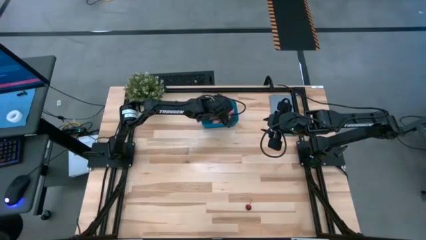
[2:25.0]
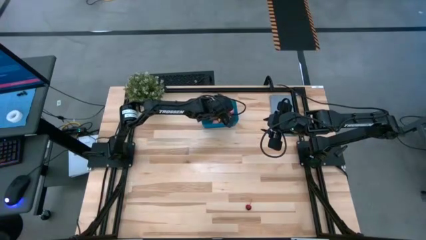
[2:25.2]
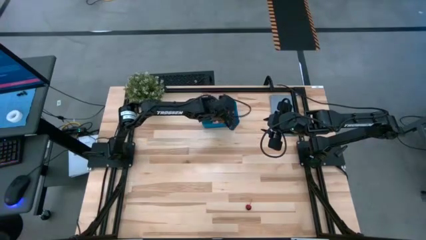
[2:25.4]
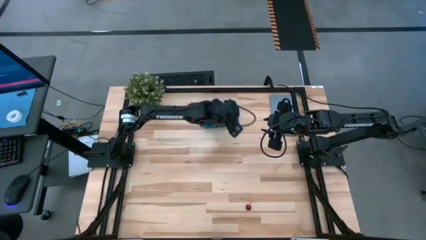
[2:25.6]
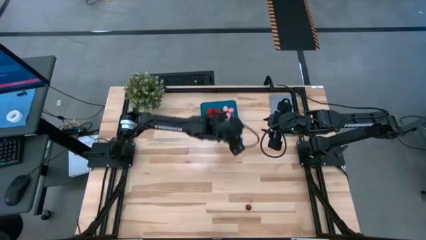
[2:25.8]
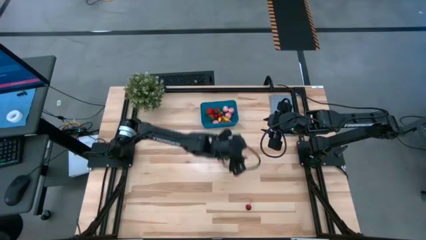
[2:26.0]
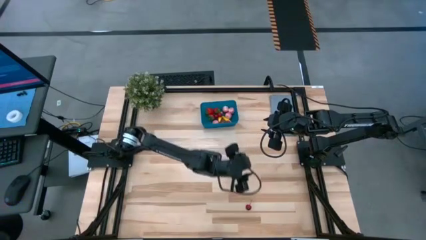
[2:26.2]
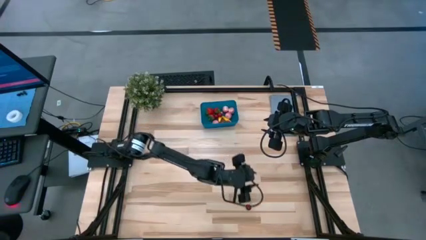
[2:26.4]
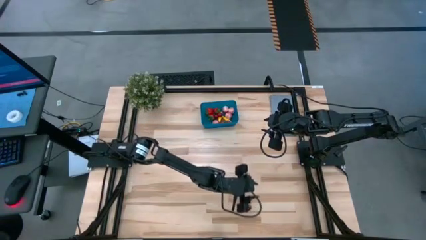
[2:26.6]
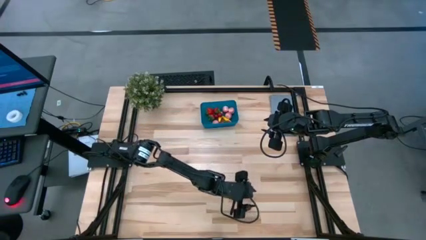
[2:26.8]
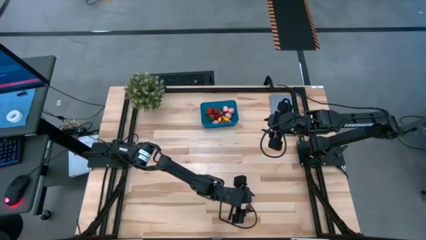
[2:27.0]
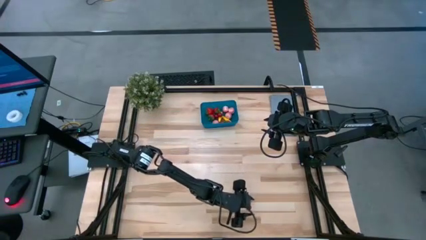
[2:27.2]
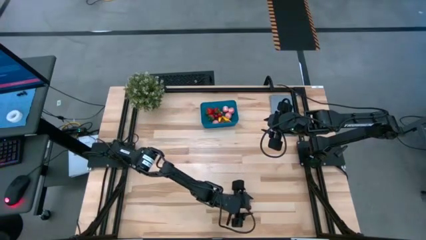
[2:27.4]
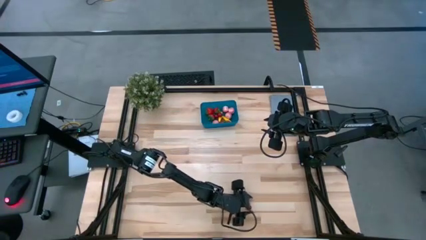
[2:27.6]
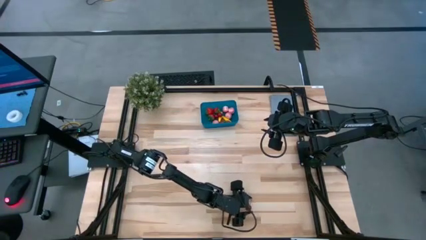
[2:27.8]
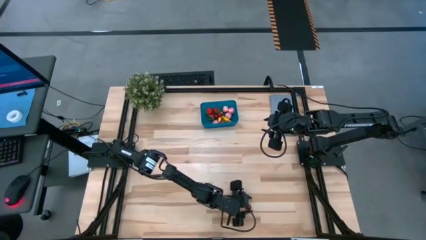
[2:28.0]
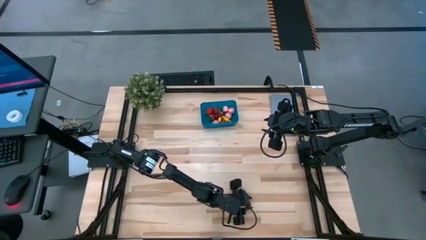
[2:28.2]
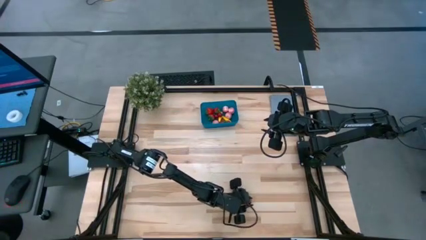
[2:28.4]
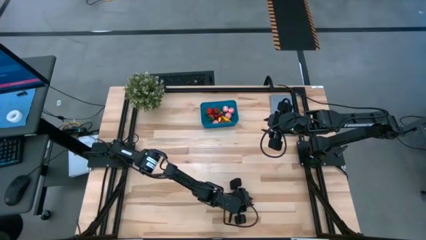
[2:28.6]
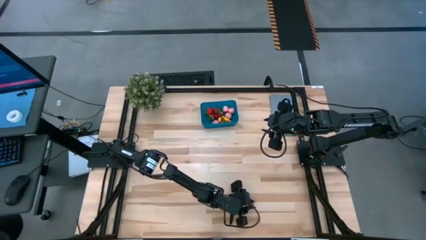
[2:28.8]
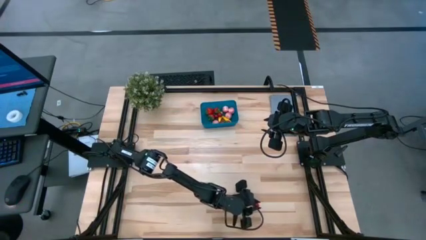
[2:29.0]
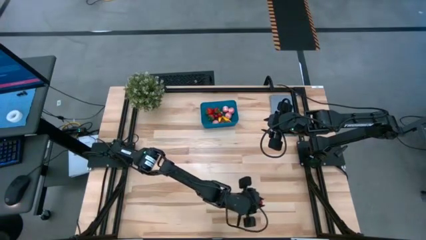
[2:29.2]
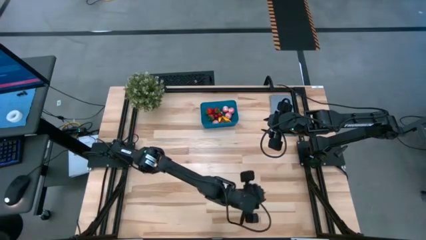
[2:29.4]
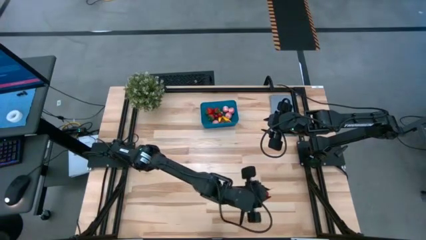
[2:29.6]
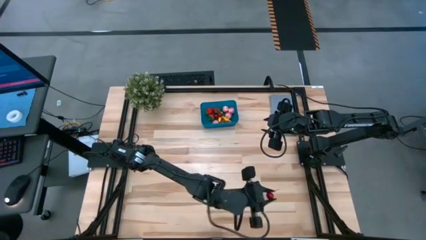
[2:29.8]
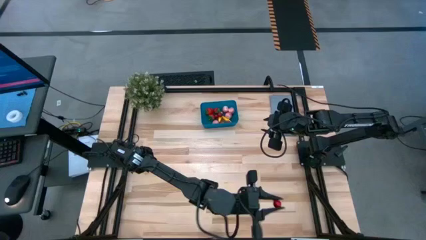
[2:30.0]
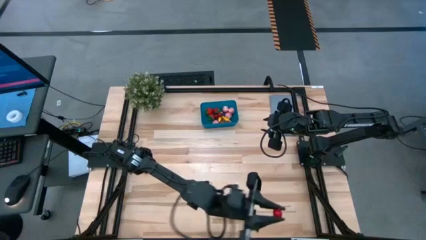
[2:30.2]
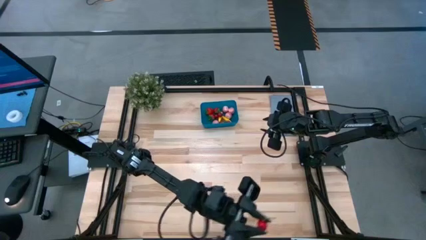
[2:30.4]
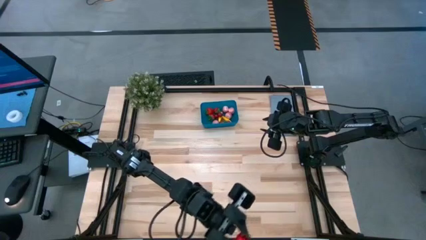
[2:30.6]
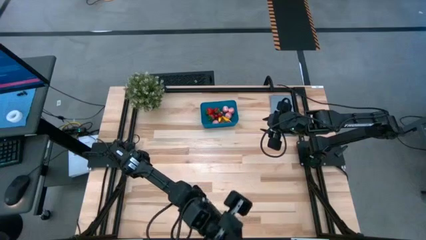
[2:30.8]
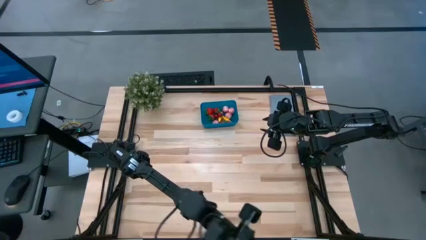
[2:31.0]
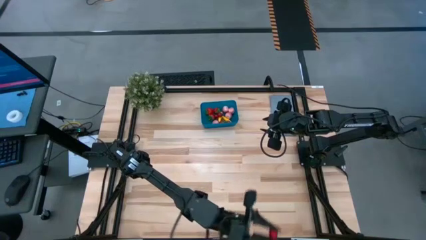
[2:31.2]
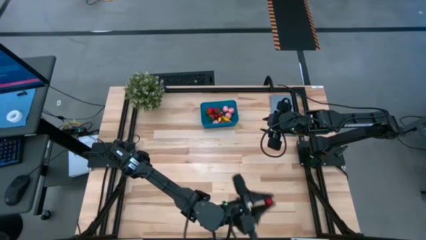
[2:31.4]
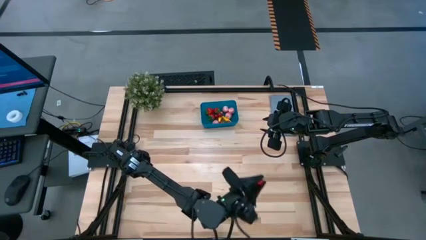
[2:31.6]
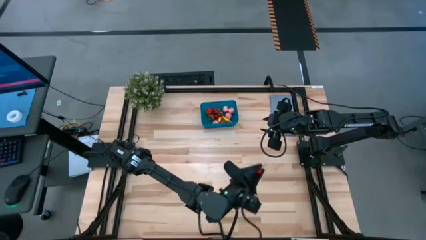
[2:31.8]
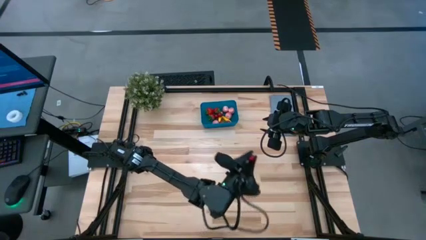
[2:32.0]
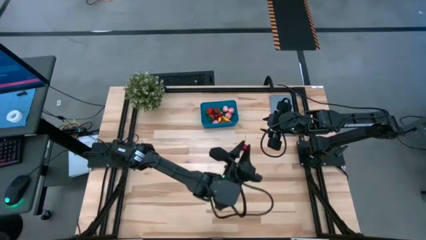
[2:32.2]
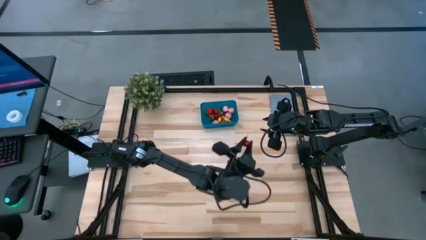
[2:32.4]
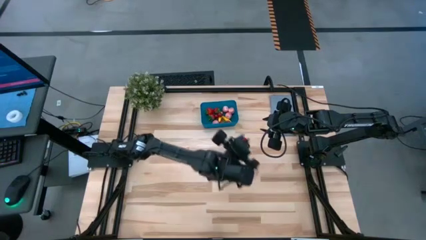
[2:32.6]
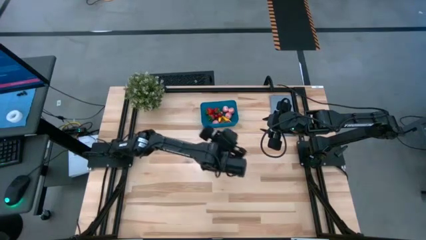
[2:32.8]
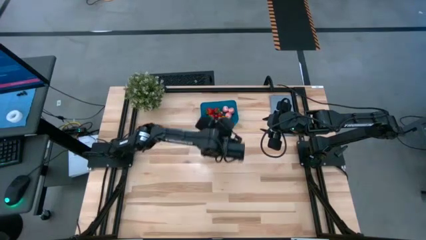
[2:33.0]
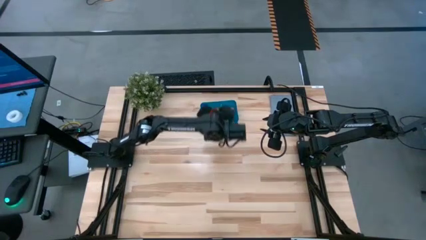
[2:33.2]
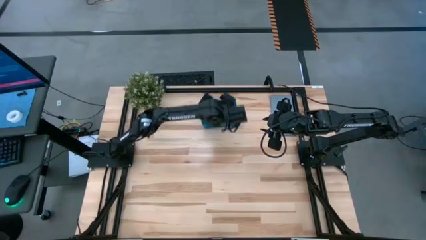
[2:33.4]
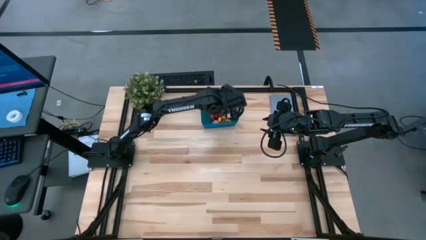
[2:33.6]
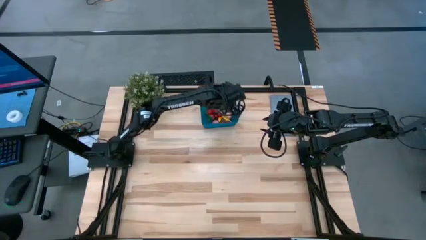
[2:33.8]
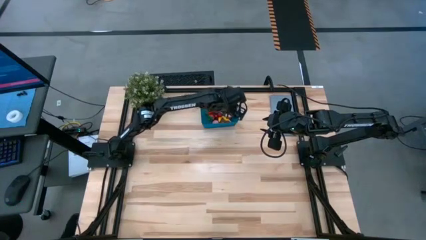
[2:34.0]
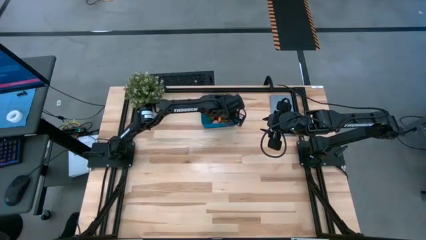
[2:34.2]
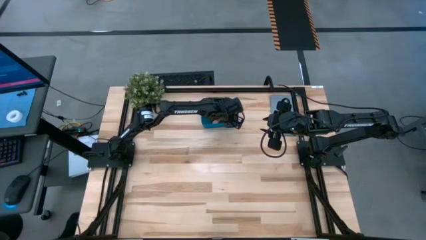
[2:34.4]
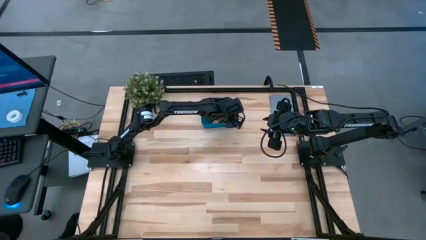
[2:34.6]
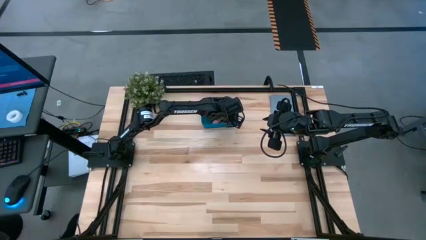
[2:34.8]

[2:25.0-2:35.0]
Task: Pick and placing Produce into tupperware
Put the cherry into the blue bin

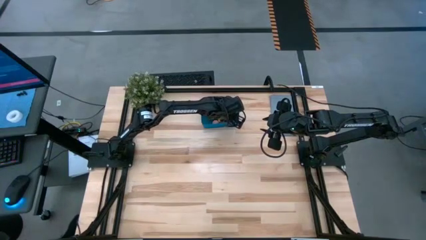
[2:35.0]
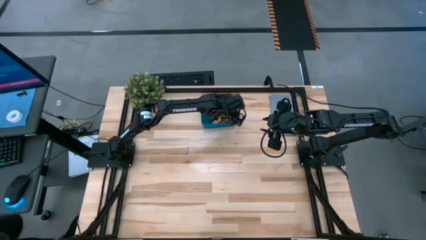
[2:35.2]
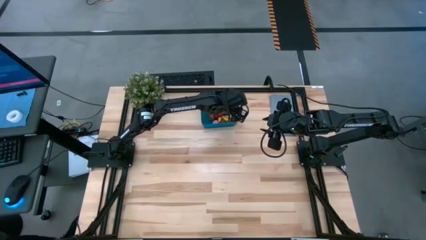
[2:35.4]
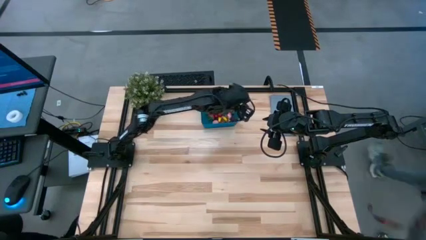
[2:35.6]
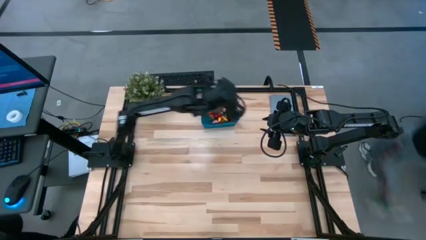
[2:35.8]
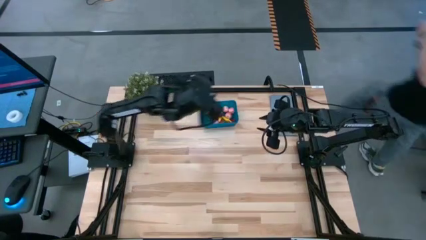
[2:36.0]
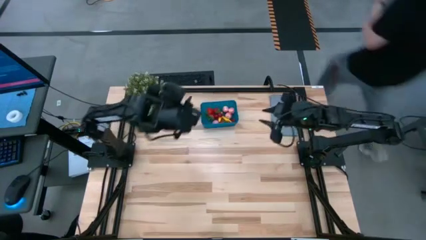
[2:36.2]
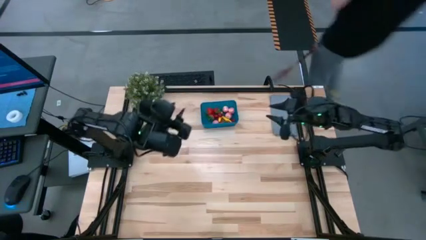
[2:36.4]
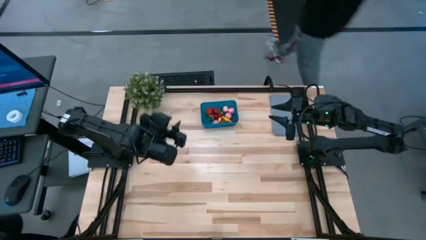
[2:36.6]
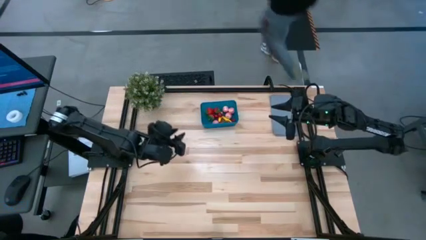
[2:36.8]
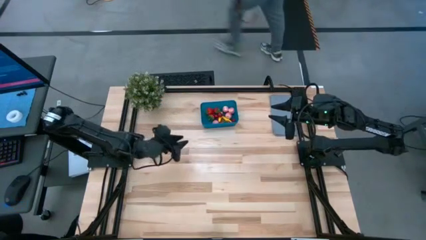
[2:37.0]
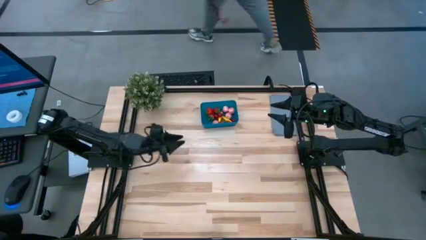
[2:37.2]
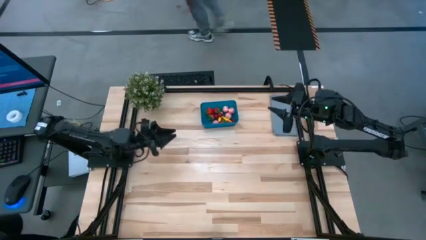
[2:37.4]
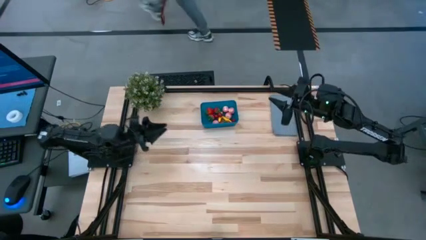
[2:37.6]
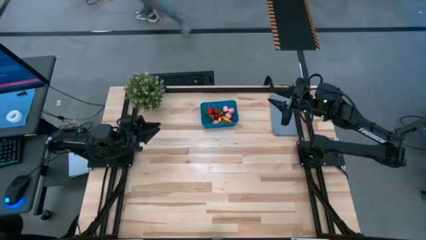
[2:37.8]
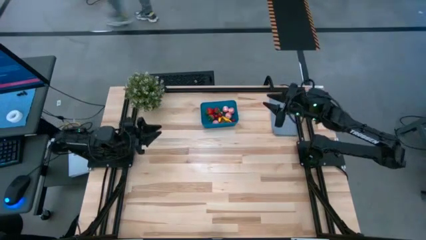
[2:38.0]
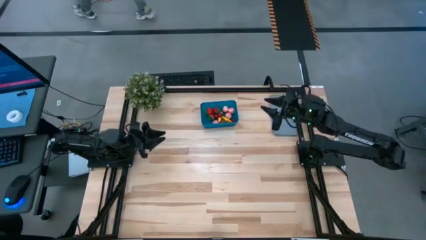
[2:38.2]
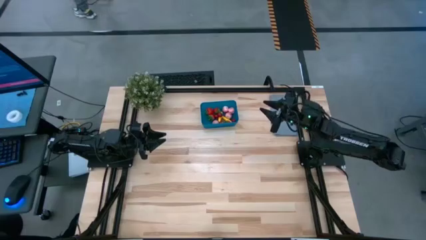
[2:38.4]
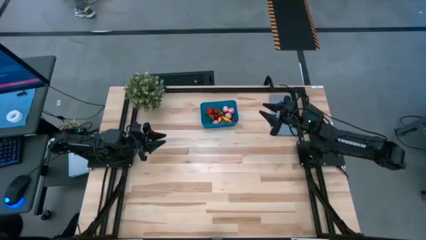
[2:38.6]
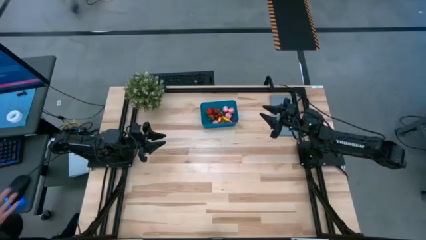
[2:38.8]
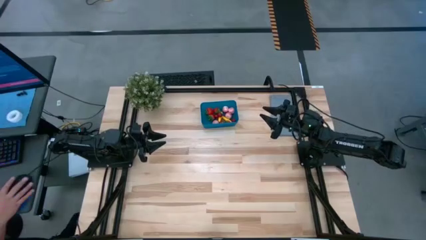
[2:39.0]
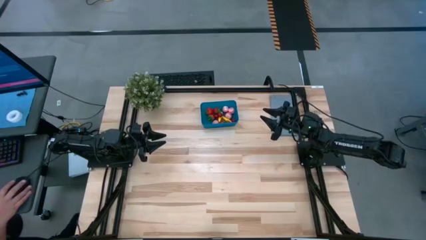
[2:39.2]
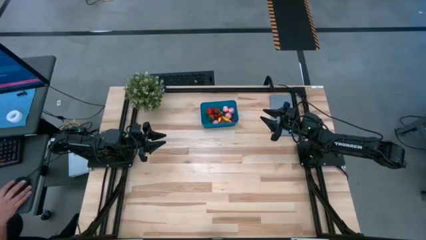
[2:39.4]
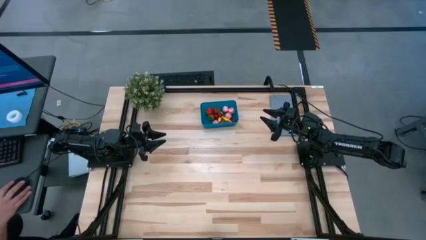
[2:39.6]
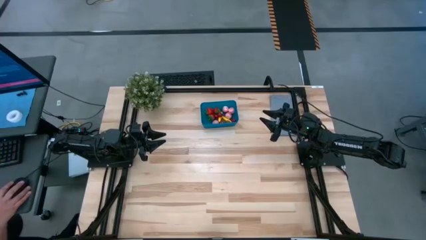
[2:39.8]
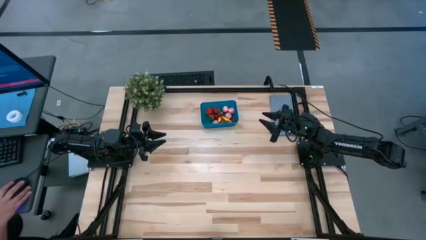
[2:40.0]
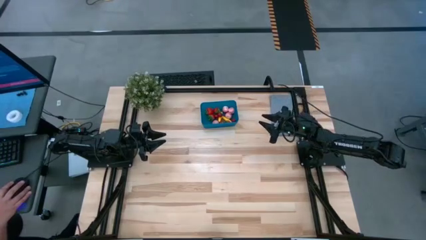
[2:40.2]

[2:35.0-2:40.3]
Return to Home Position
